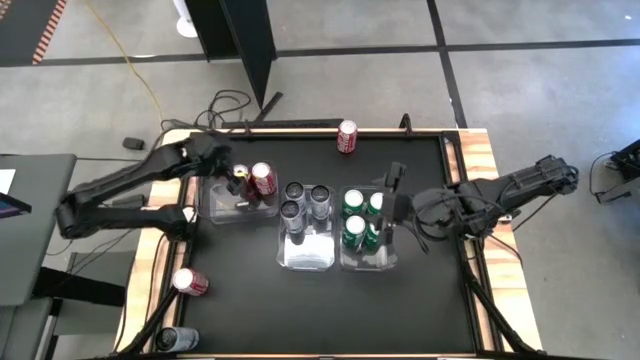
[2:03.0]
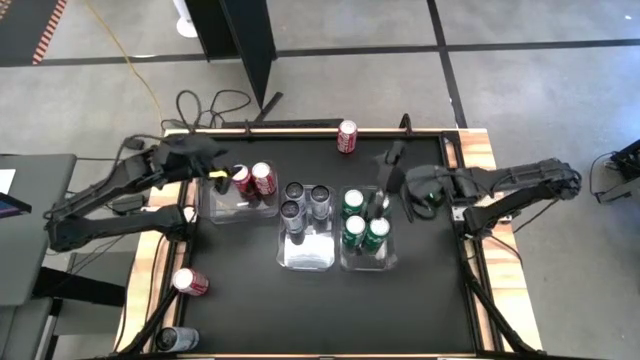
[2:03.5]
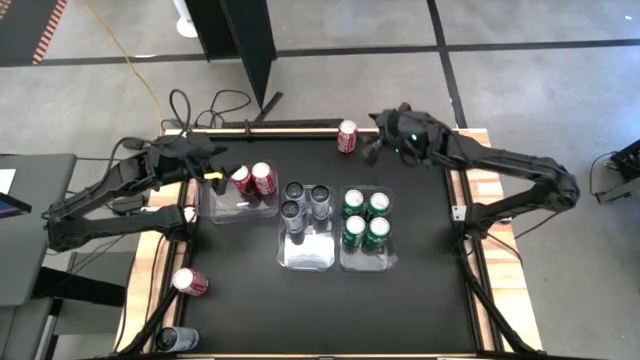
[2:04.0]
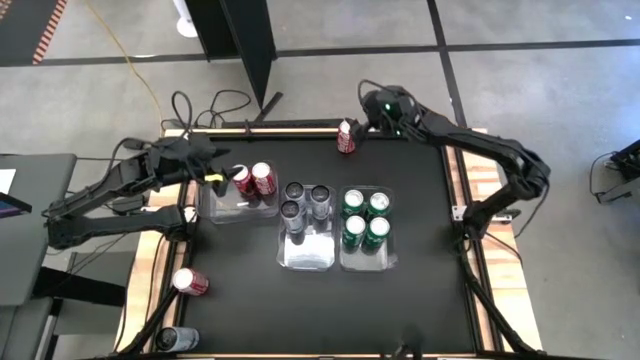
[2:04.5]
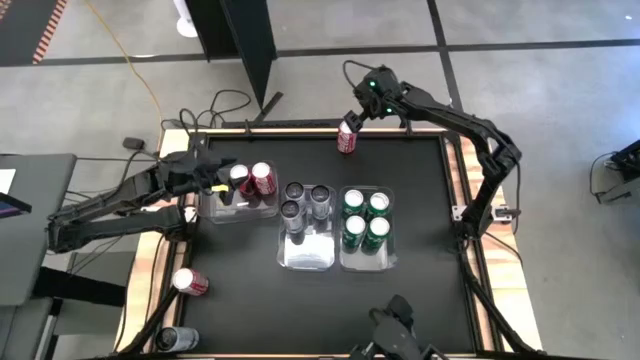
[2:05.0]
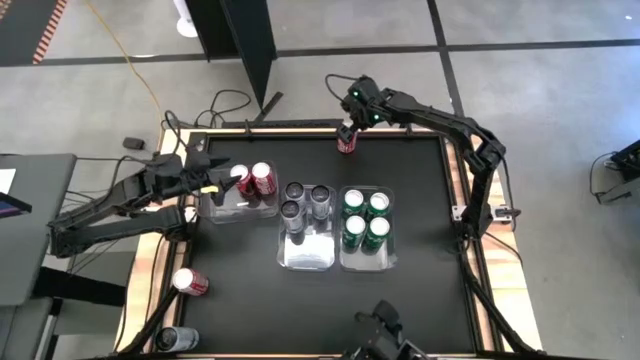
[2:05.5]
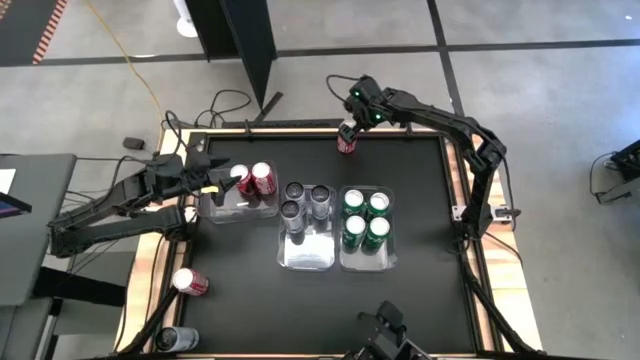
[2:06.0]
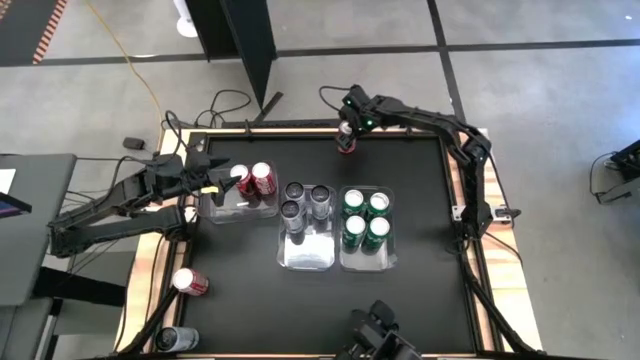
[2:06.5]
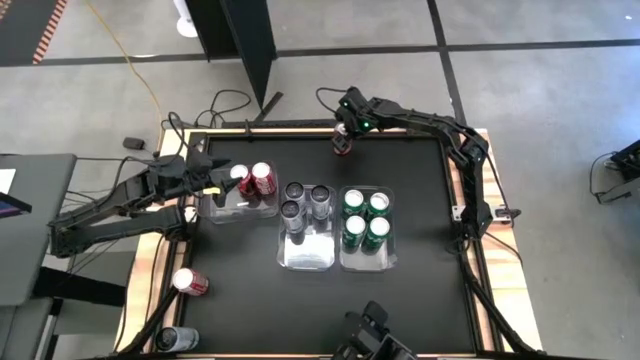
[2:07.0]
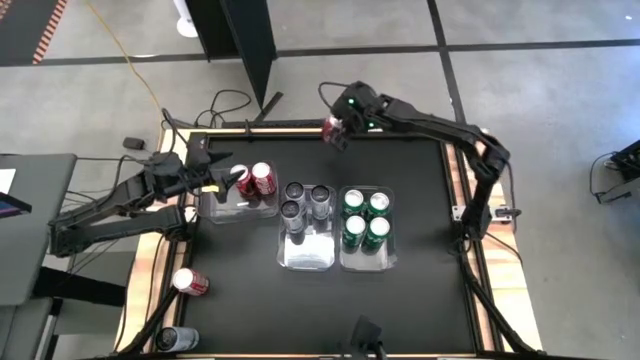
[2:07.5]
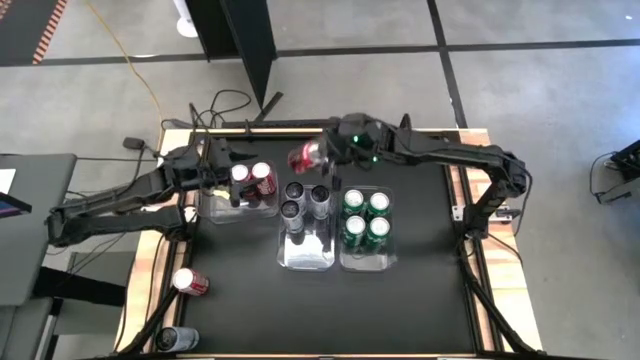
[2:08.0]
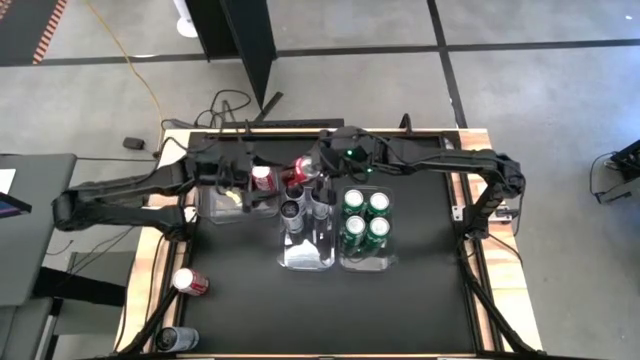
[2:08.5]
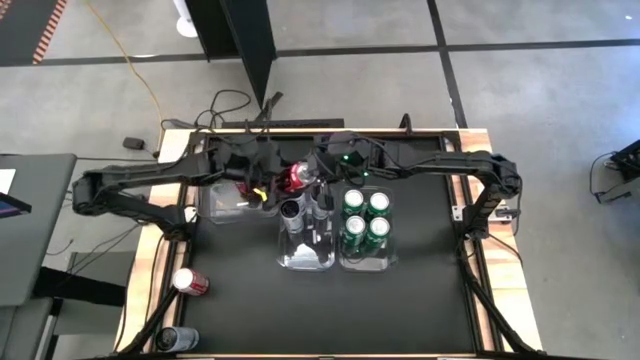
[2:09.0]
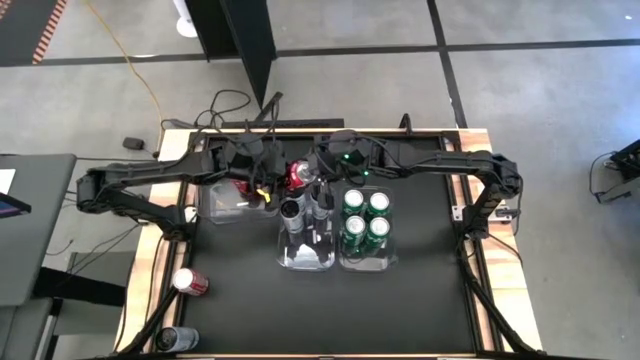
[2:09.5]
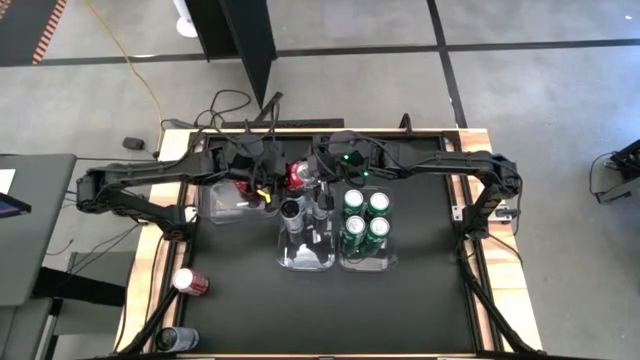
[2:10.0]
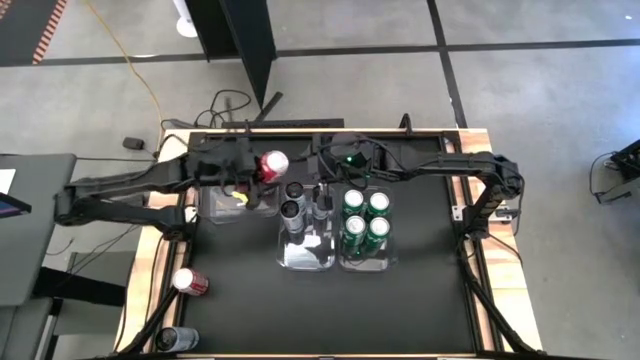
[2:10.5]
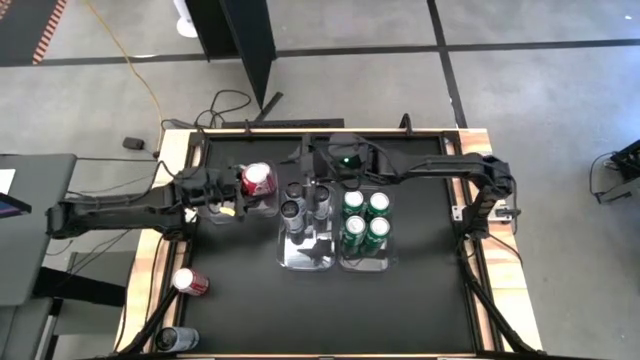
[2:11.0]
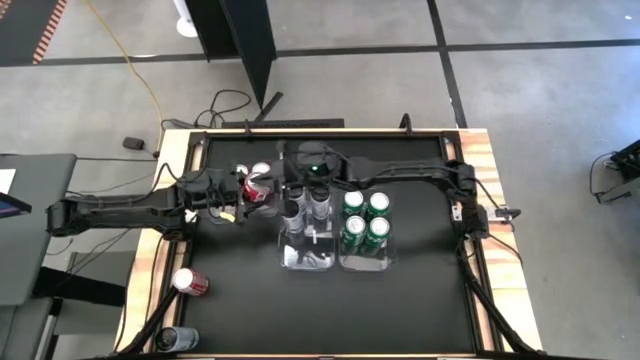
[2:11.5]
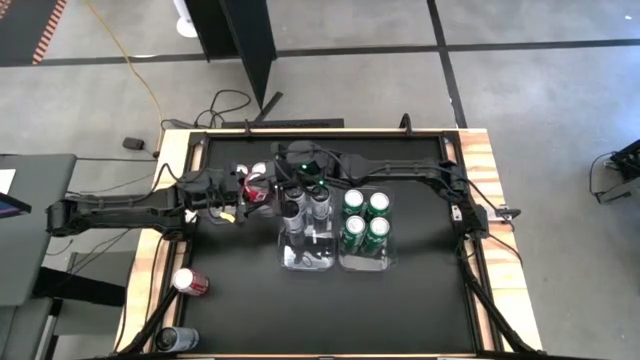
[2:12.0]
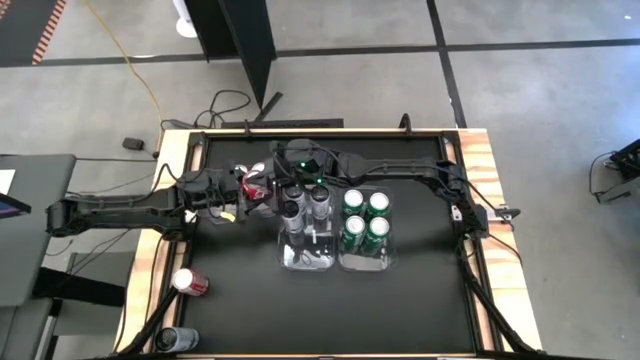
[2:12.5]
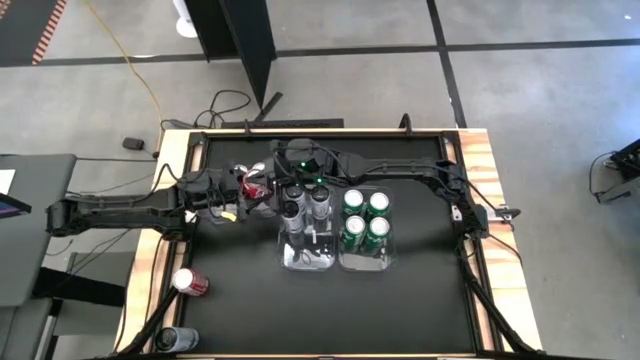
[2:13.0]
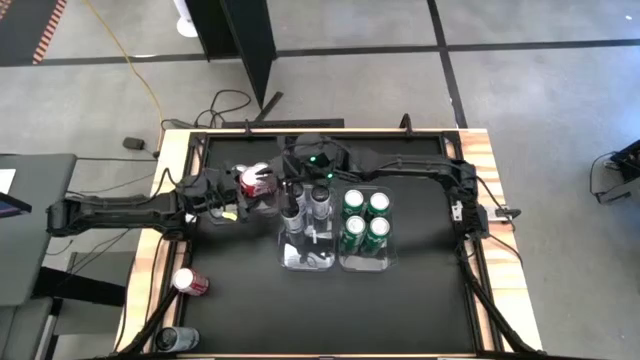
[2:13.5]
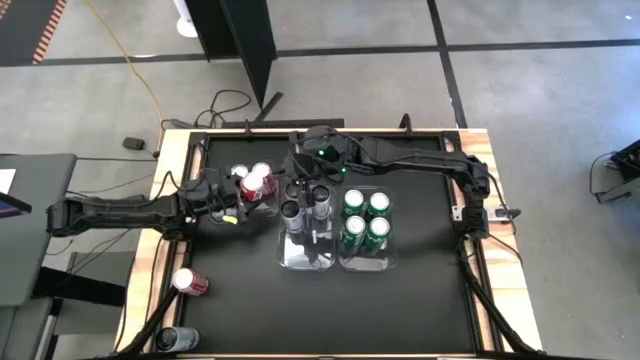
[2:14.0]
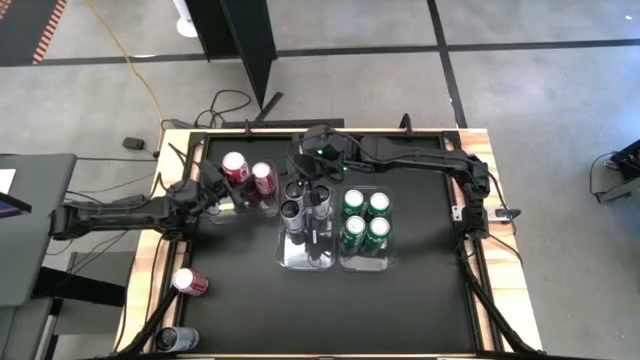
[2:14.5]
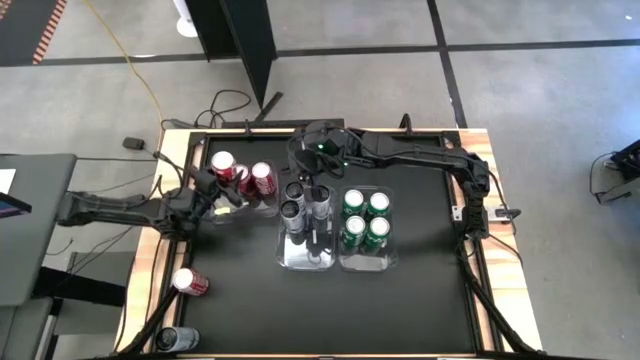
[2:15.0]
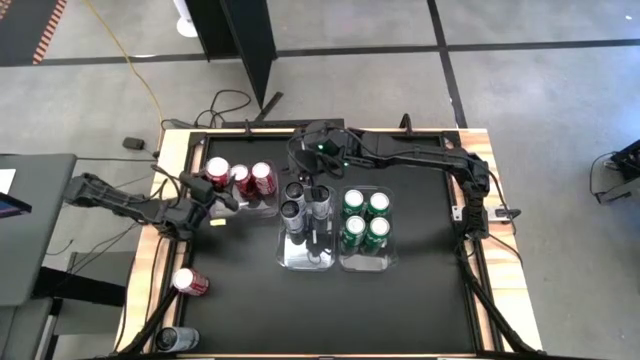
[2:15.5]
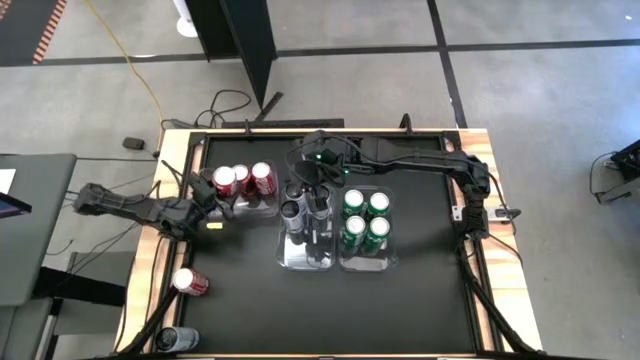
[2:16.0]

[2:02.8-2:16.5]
Task: Sort soda cans
Put the top red soda can into the left transparent bin

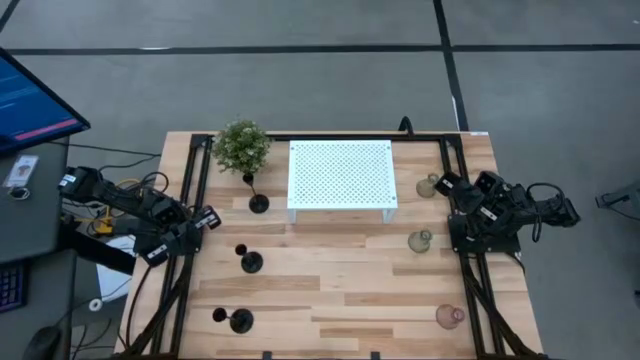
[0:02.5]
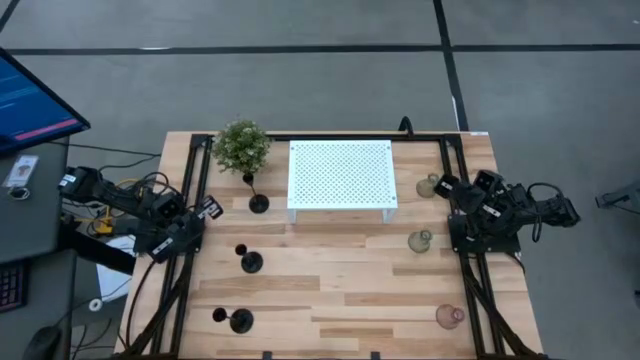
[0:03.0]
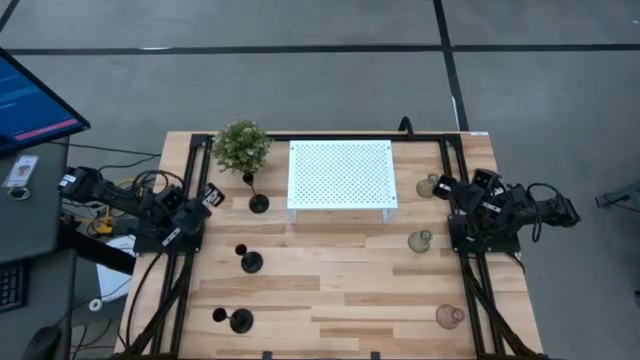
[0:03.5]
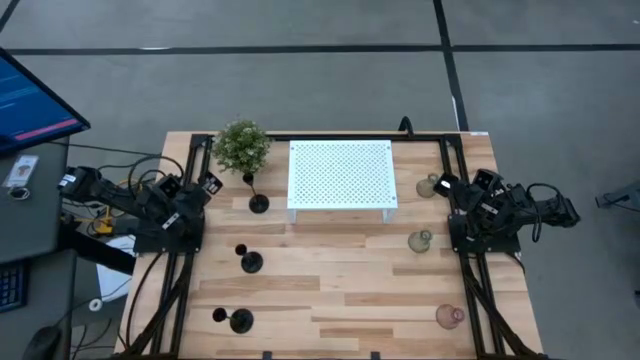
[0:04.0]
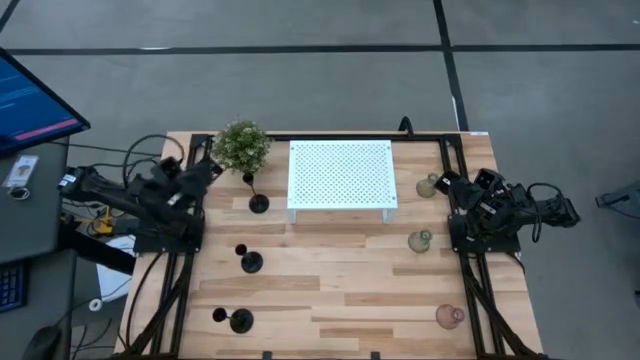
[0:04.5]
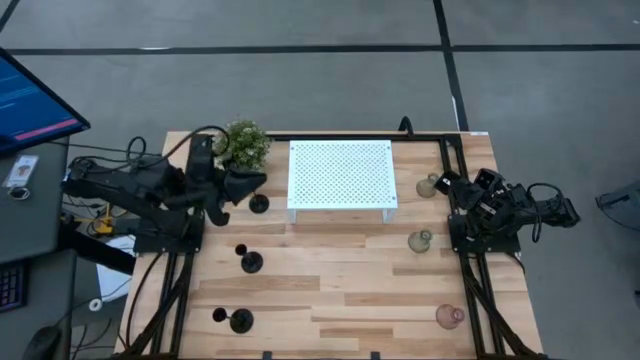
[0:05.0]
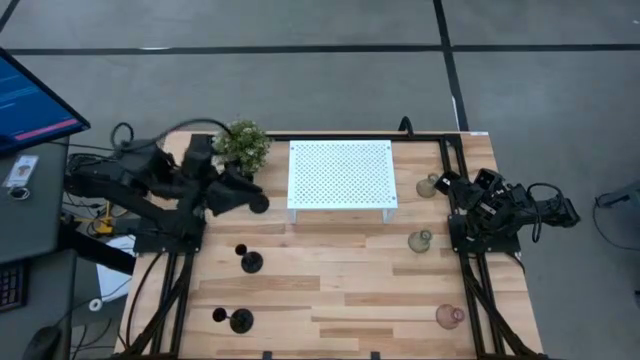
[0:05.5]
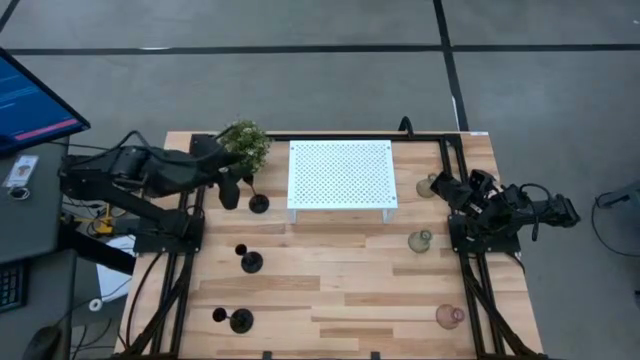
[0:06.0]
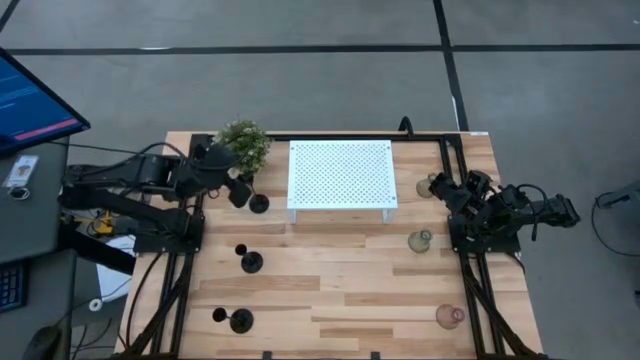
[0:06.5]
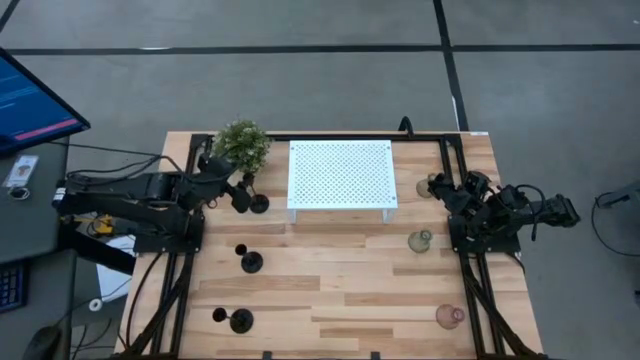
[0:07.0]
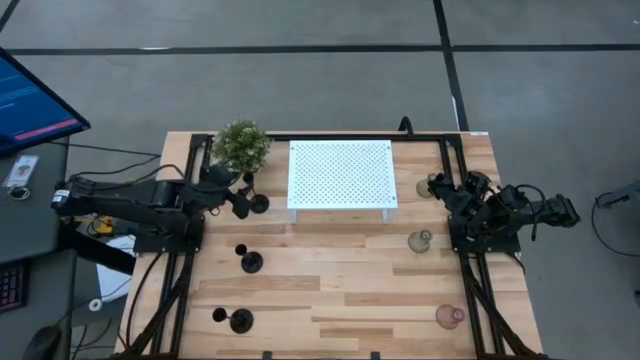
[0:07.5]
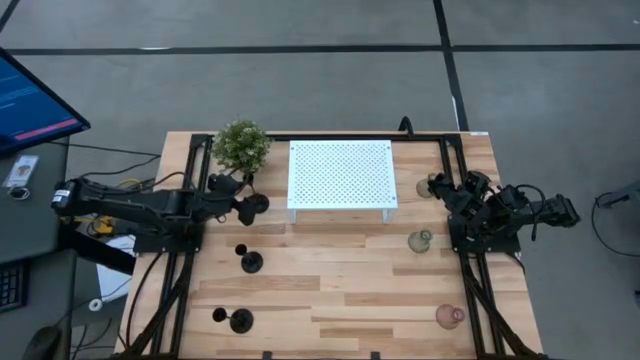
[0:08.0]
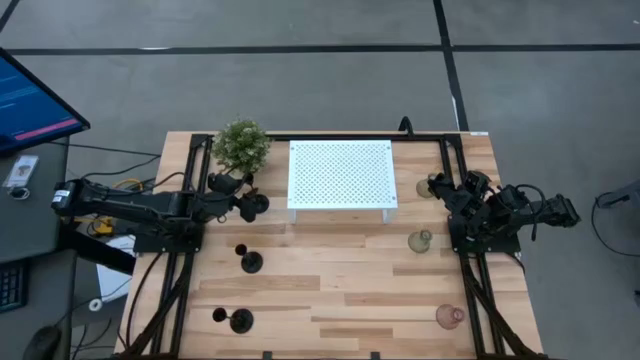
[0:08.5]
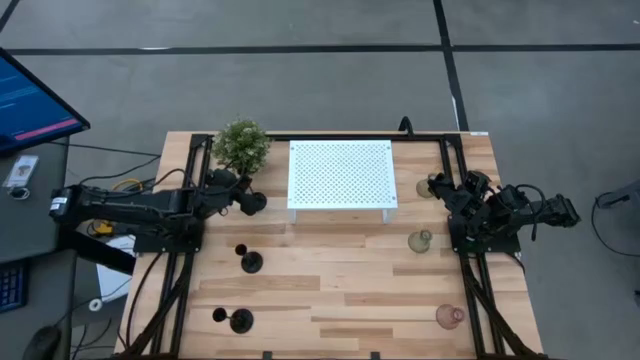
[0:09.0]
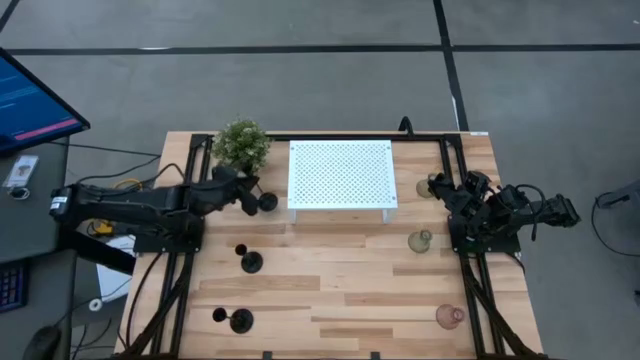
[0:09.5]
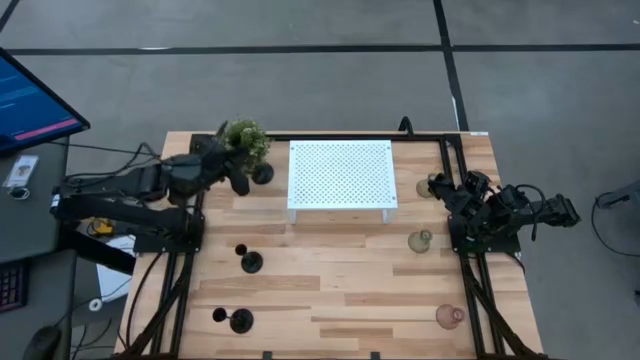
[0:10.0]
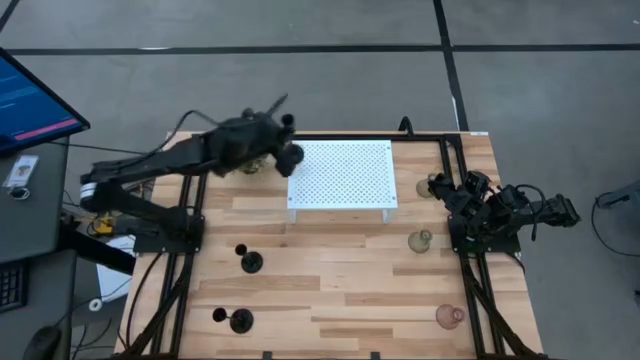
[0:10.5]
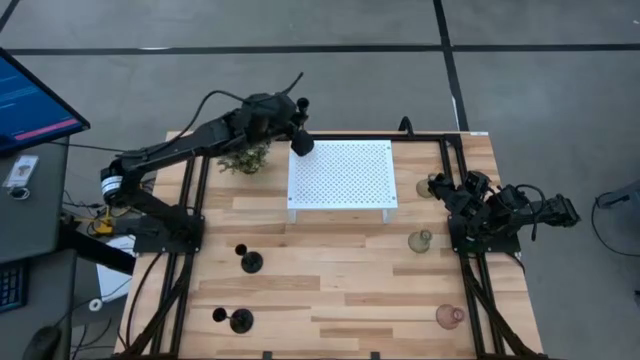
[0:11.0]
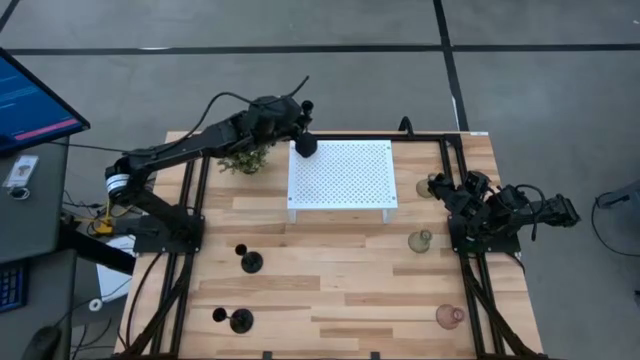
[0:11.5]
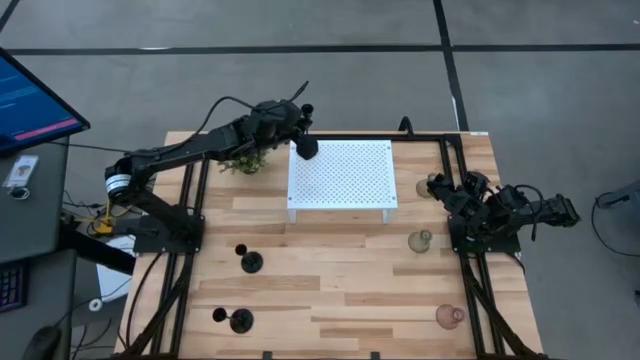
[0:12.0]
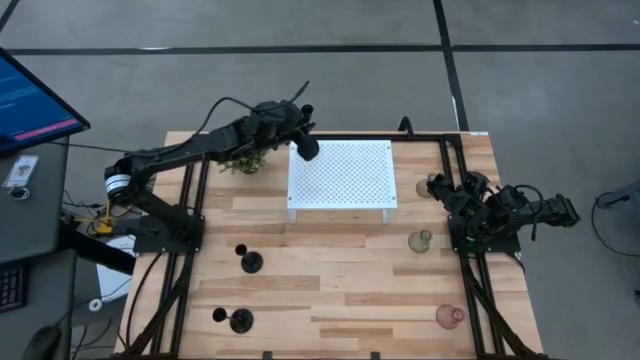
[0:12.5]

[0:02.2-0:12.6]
Task: Pick & Place candle stick holders
Put the top black candle holder on the shelf
